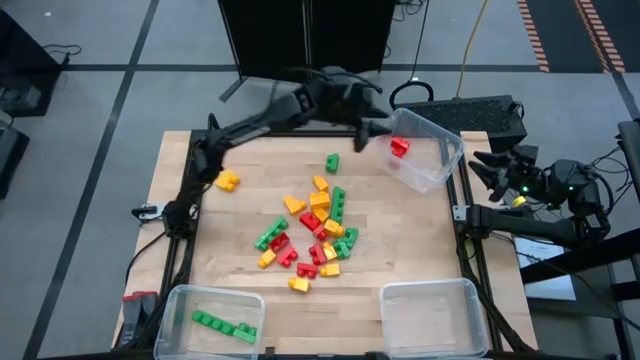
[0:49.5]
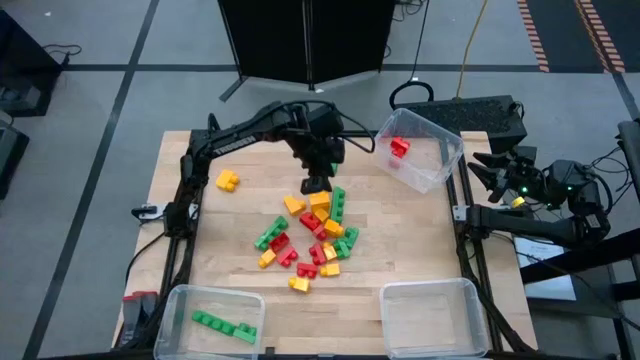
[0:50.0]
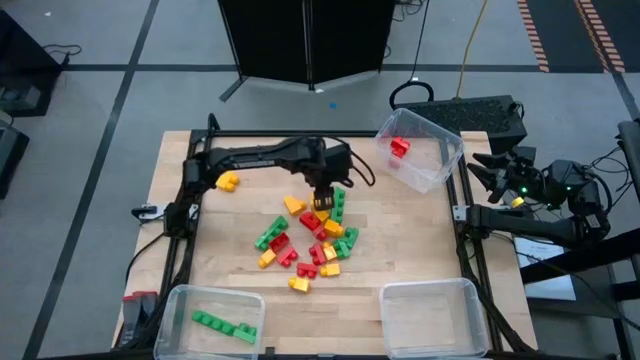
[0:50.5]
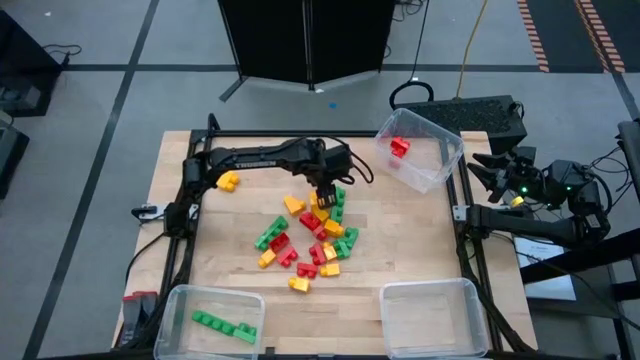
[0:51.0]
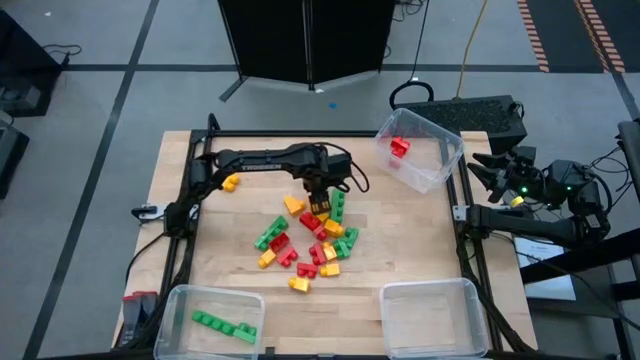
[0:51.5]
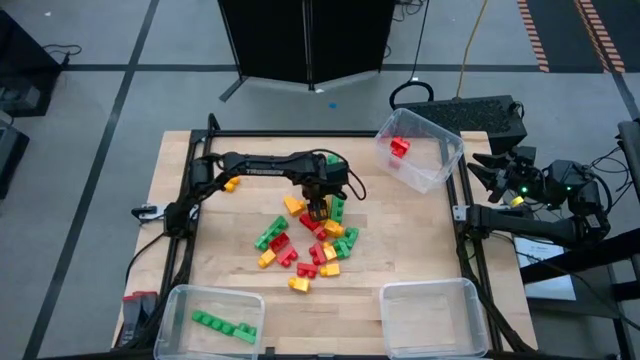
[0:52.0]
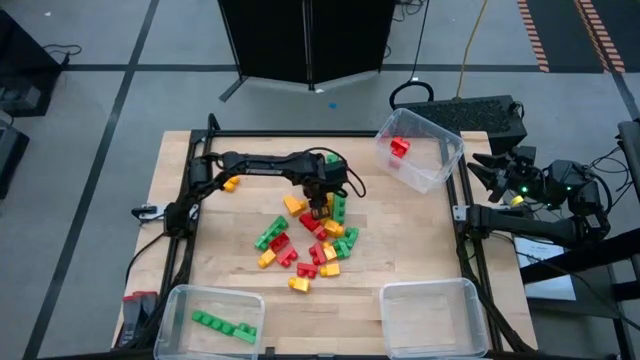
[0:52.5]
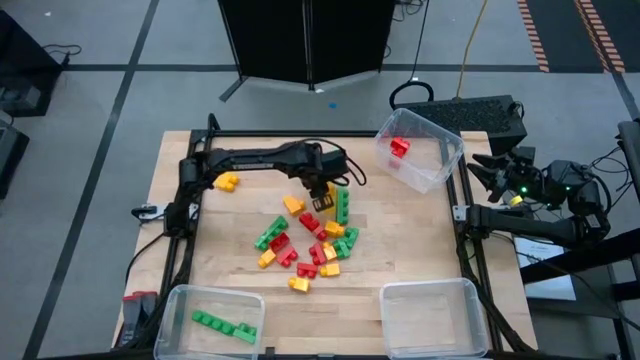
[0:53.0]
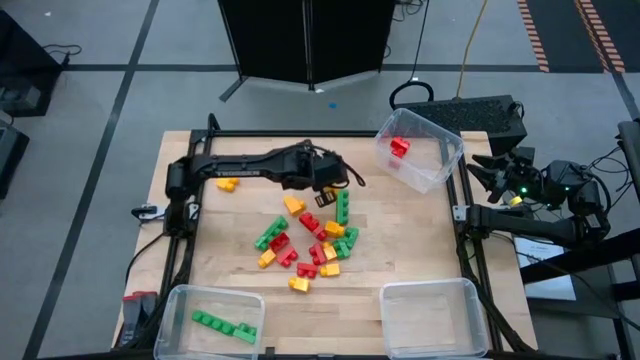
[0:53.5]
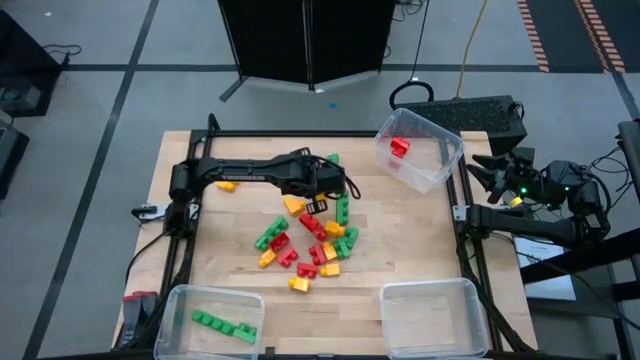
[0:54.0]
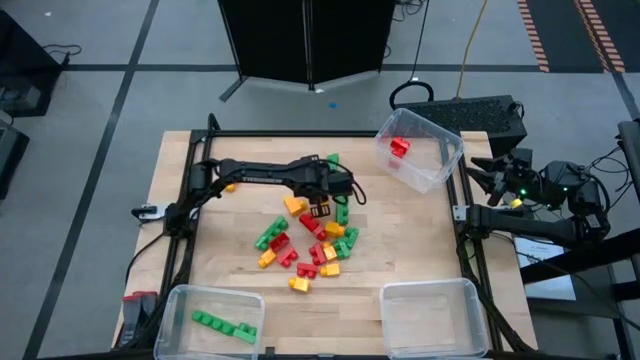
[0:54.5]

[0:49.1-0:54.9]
Task: Sort blocks
Put the yellow game piece into the bottom right transparent bin

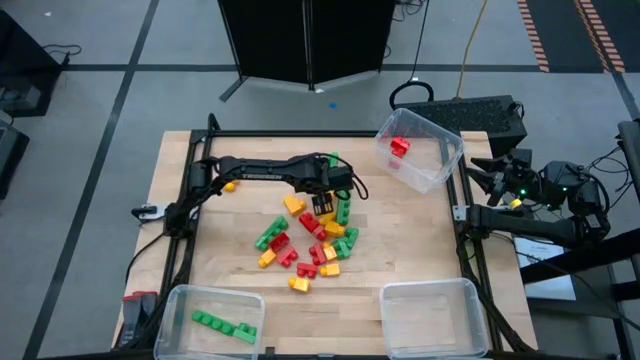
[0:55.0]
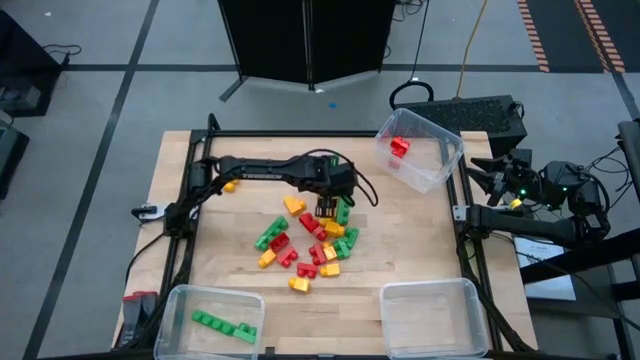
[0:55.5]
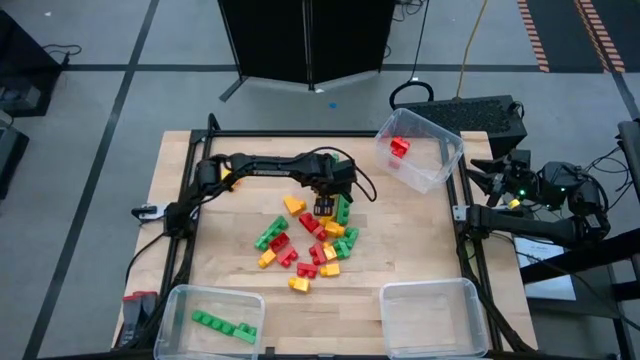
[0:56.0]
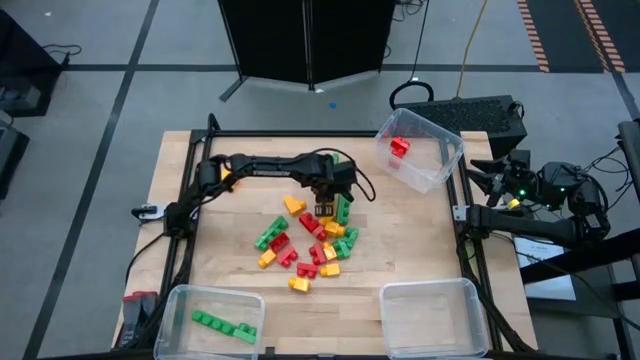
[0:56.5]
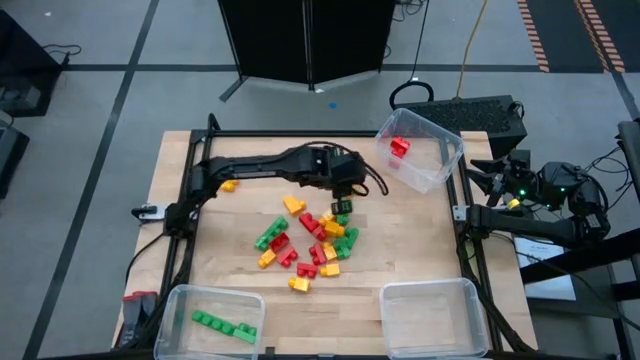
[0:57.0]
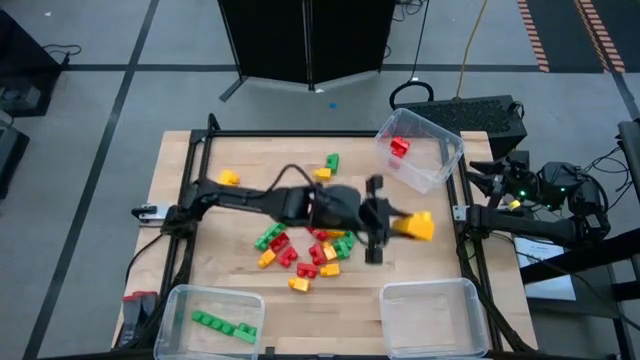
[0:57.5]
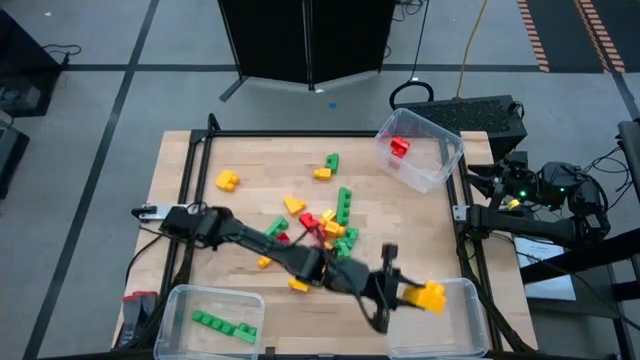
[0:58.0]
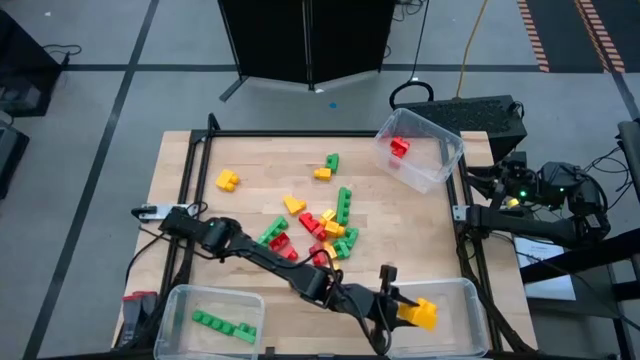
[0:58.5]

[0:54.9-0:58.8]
Put the yellow game piece into the bottom right transparent bin

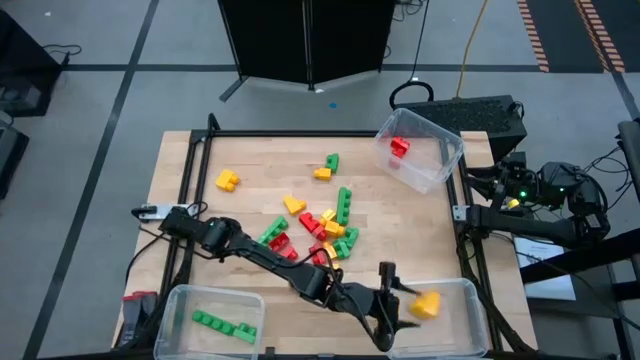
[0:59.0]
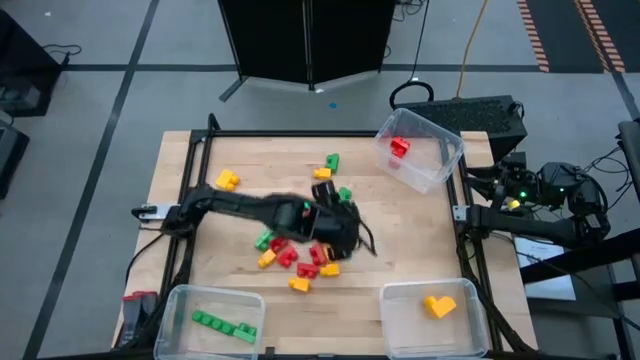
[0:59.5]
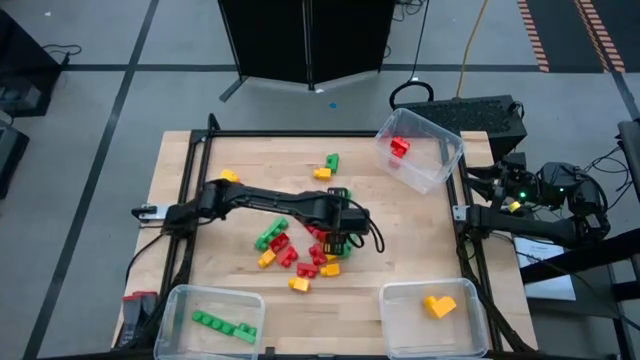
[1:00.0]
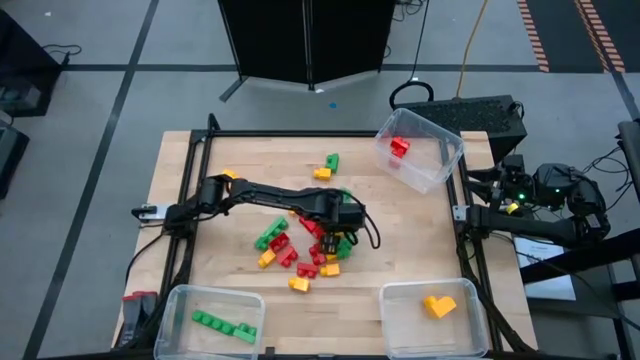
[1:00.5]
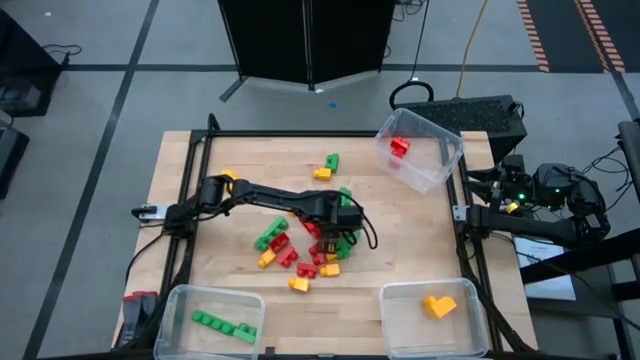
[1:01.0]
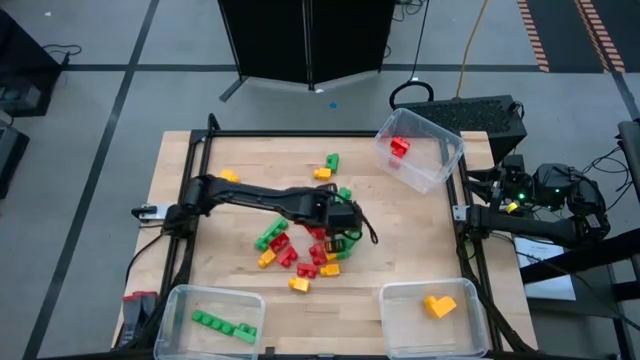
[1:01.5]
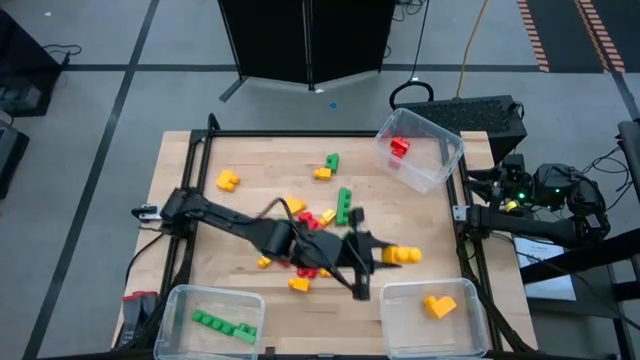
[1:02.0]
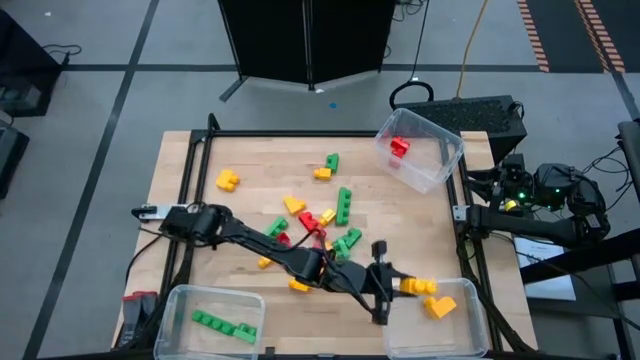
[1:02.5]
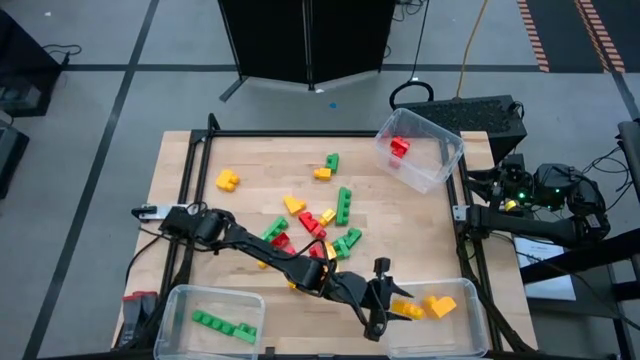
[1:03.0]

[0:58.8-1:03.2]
Put the yellow game piece into the bottom right transparent bin

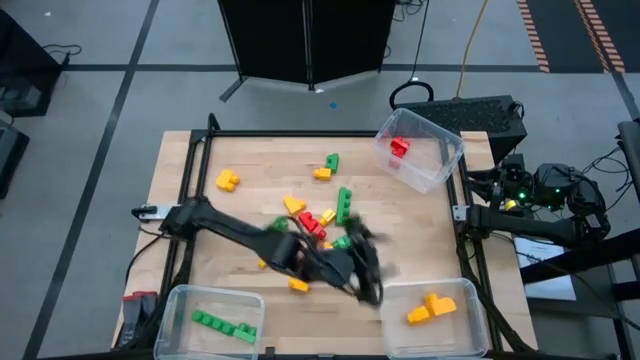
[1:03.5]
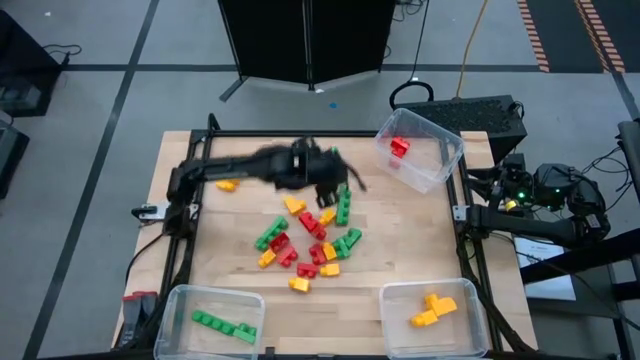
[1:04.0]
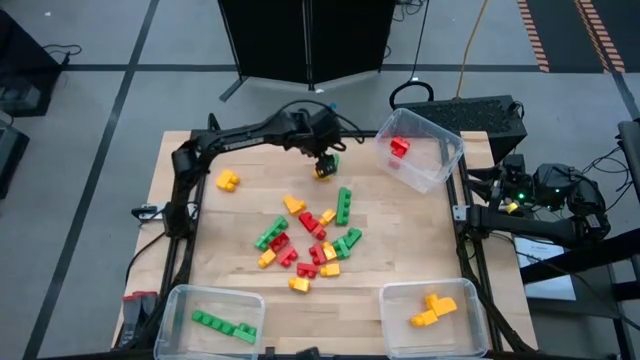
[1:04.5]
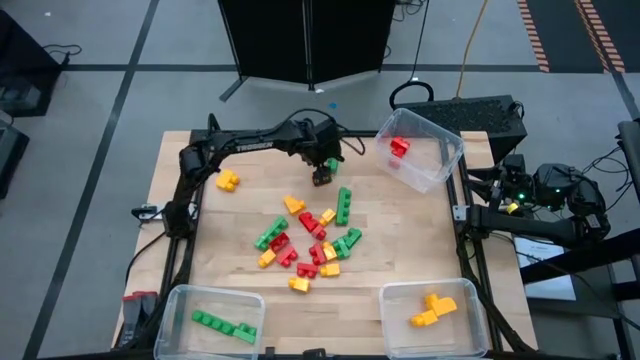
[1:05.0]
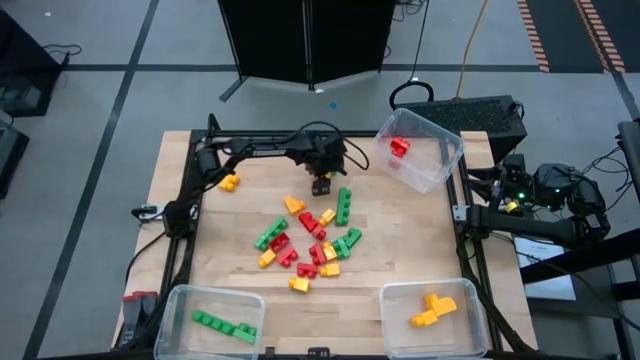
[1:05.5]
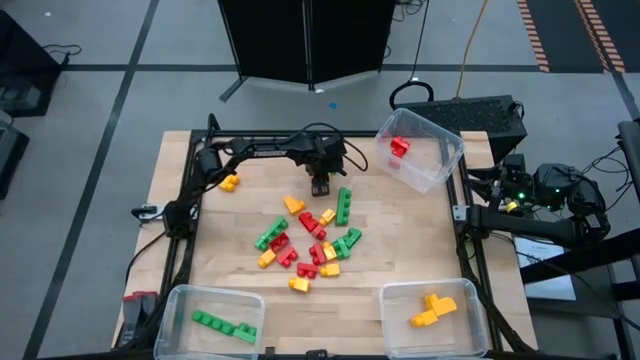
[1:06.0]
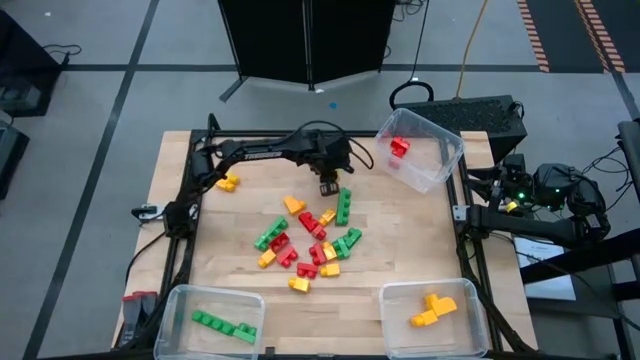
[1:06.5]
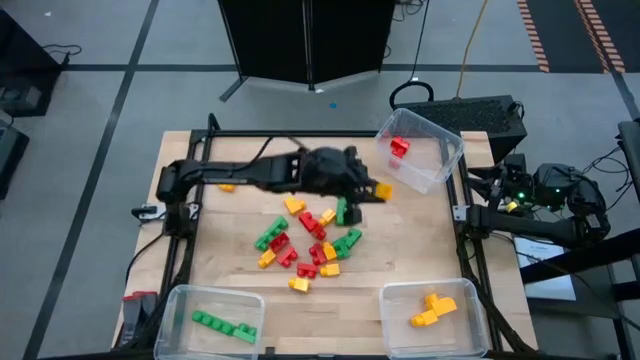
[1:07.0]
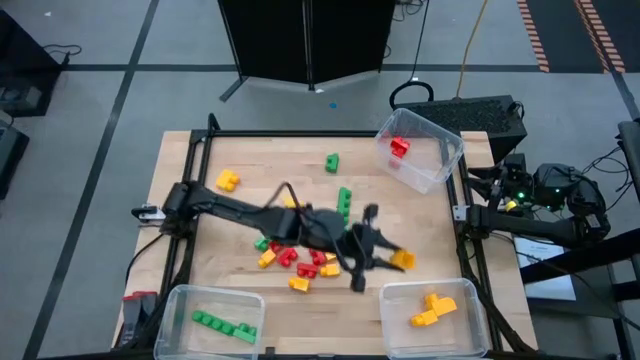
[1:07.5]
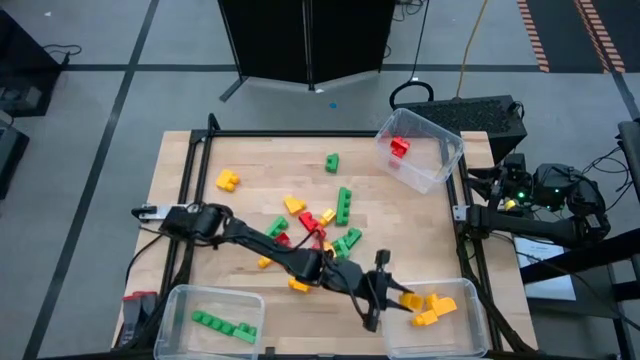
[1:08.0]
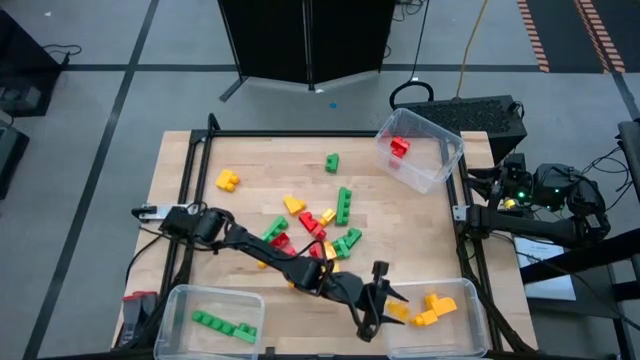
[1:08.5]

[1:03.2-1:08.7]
Put the yellow game piece into the bottom right transparent bin
